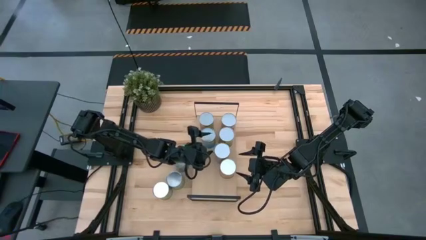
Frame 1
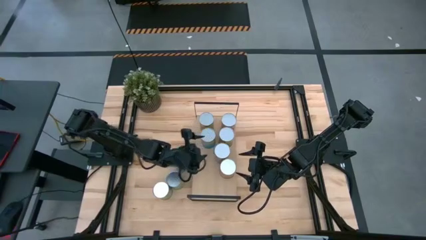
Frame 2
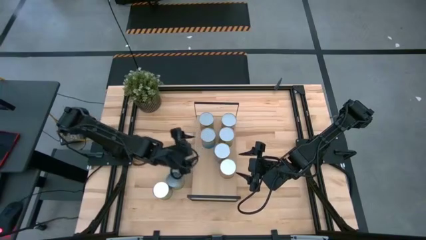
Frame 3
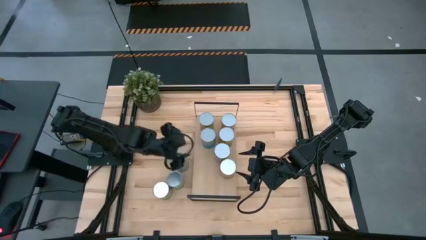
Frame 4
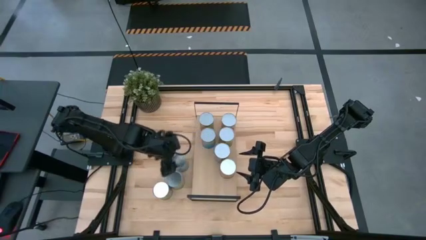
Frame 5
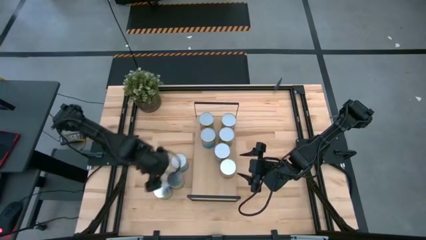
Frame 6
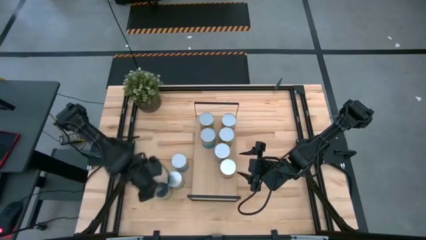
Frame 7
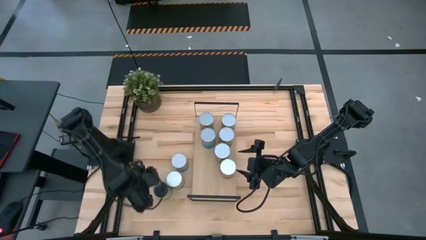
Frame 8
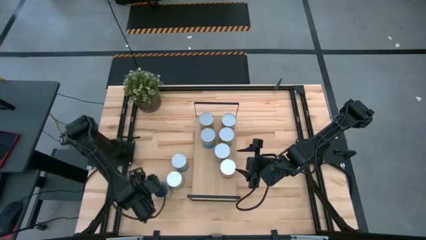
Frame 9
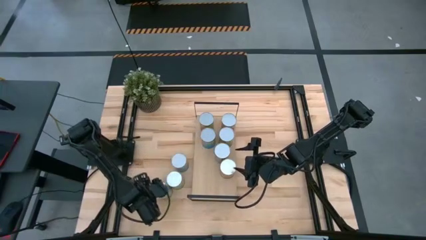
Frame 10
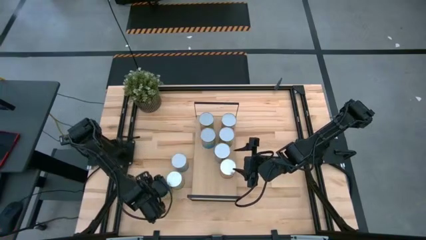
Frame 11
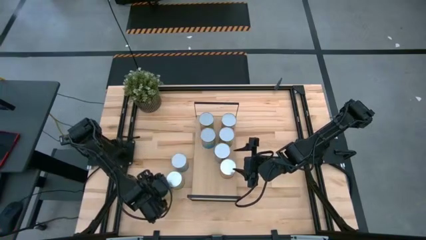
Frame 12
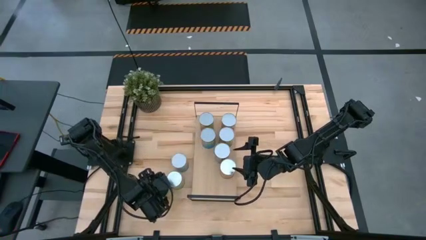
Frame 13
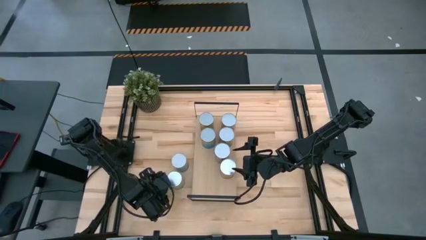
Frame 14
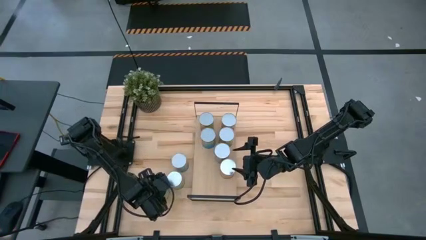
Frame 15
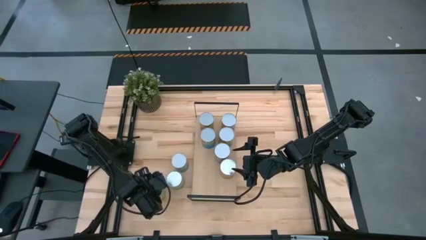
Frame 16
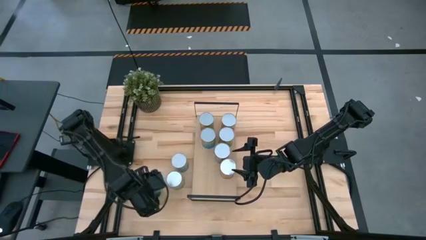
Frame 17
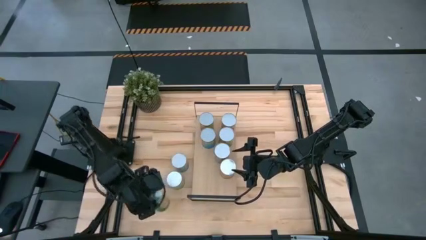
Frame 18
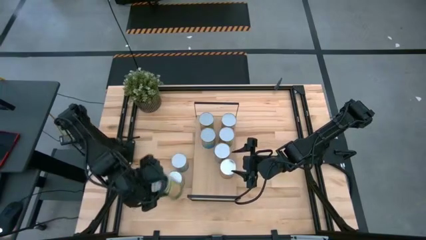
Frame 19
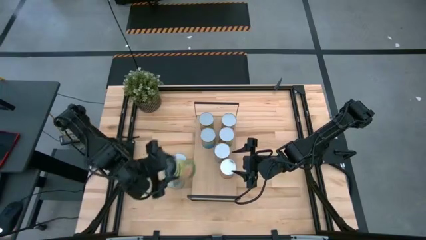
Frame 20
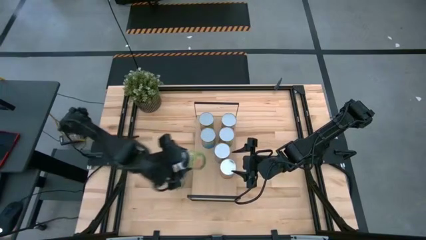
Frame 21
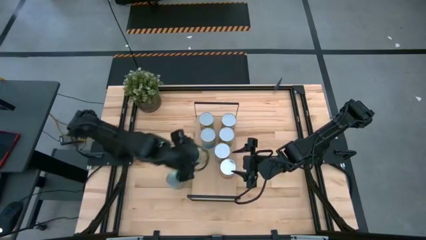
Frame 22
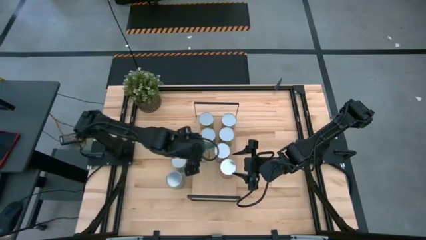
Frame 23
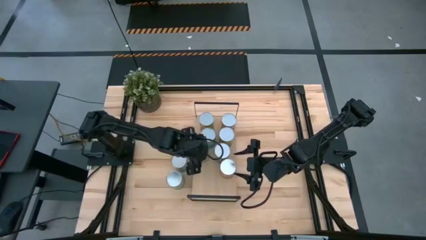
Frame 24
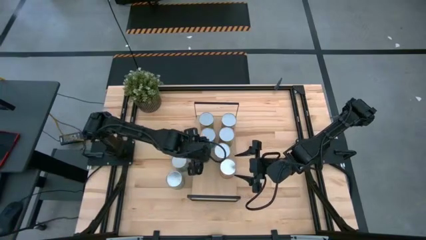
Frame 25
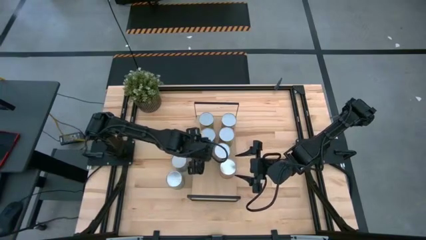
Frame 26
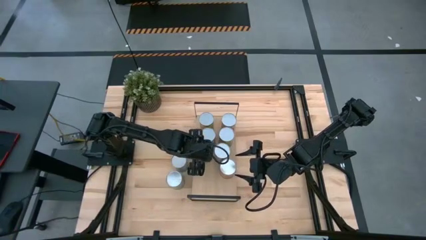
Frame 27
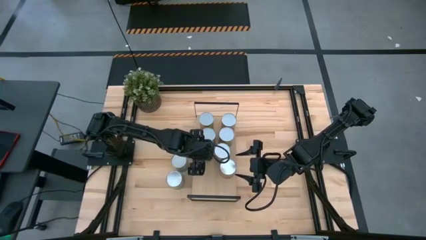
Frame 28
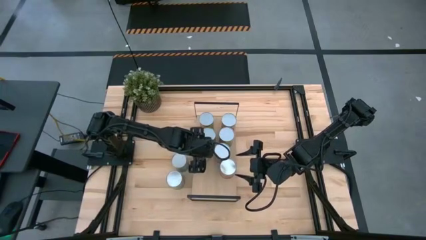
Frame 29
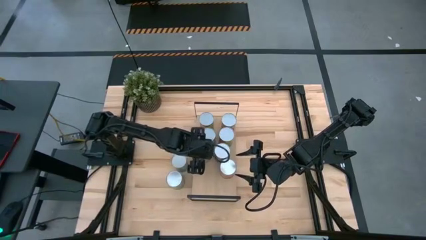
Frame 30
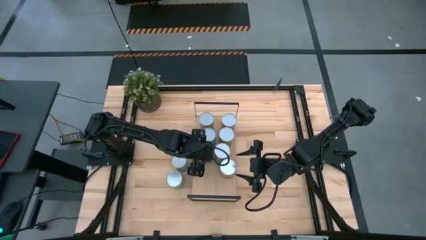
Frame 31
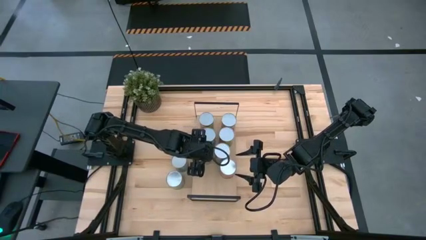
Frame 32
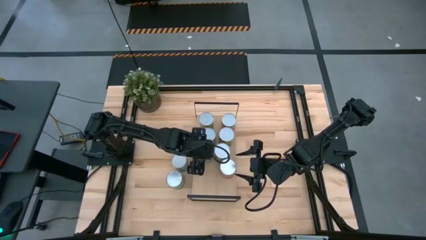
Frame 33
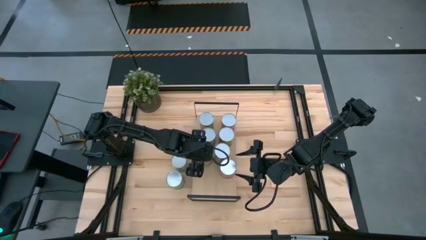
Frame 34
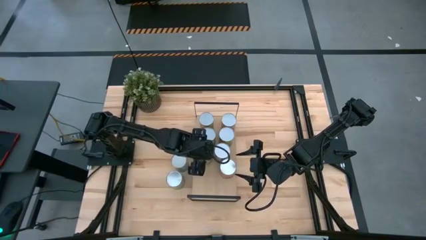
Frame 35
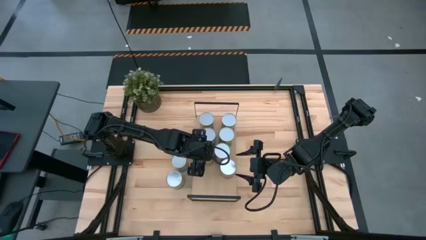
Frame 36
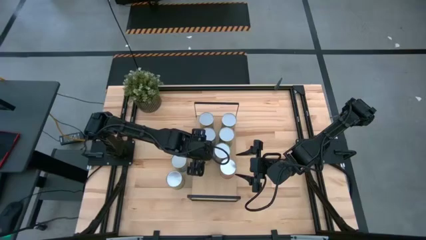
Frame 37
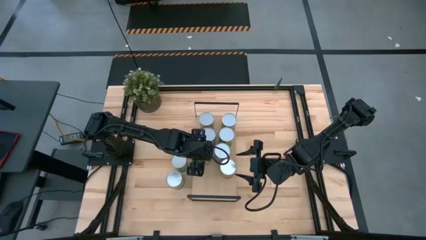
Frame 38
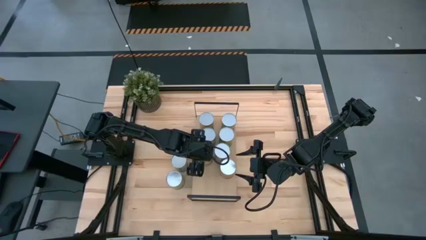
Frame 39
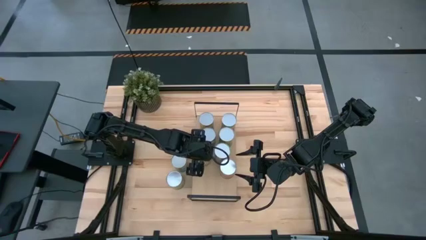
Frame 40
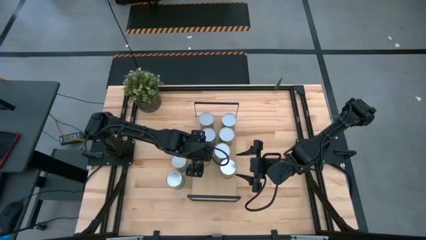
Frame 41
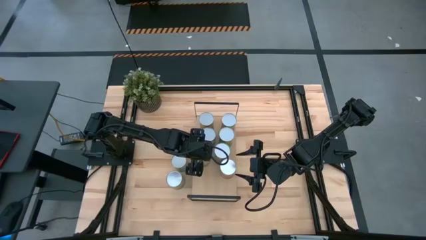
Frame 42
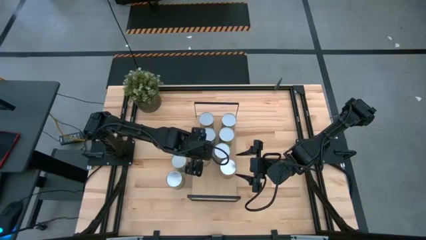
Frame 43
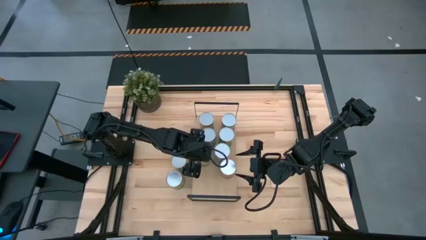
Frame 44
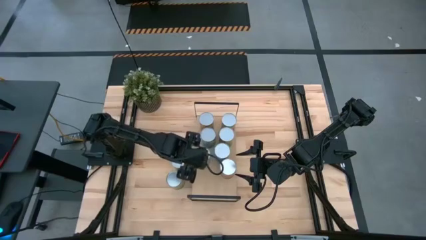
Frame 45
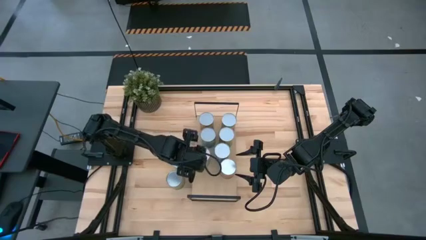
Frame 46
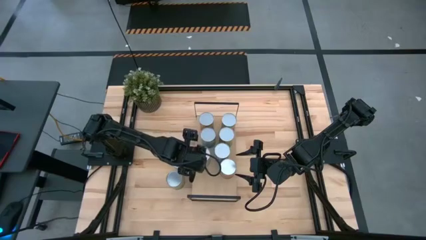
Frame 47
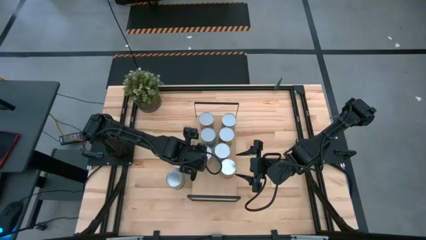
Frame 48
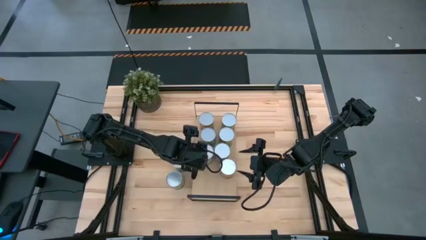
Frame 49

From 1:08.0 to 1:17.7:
Task: Pick and place cans onto a shelf
Put the canned oranges on the shelf

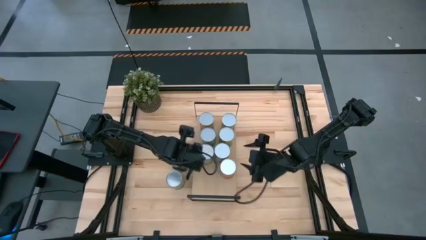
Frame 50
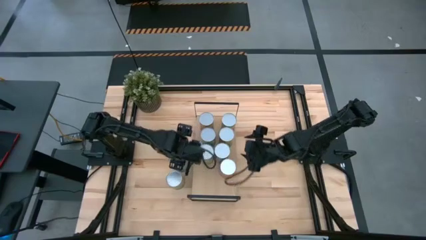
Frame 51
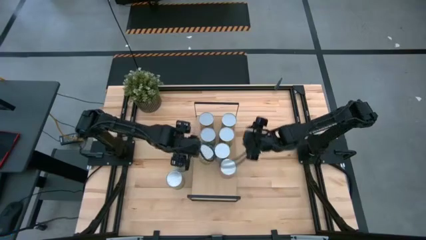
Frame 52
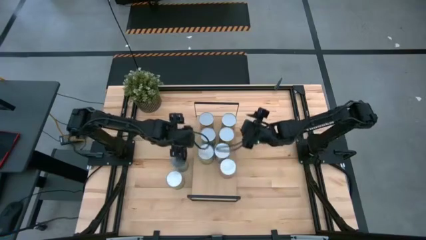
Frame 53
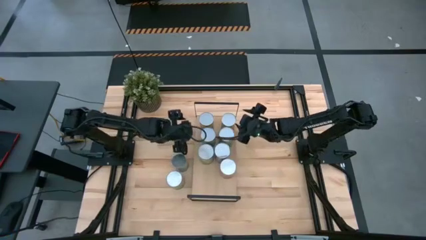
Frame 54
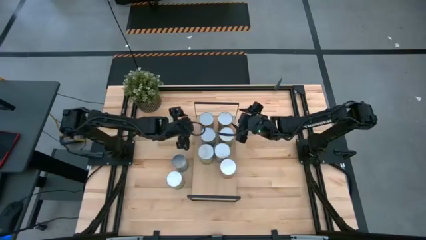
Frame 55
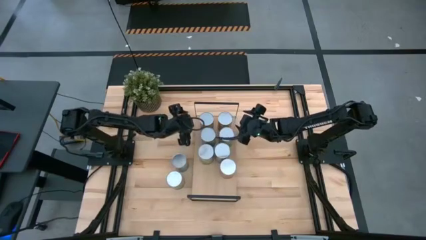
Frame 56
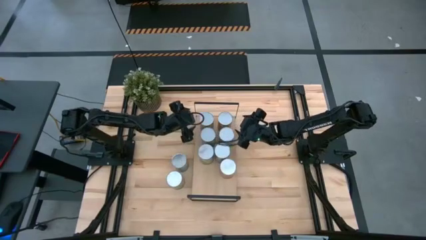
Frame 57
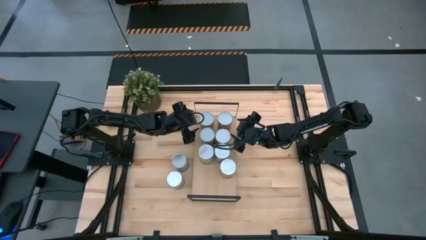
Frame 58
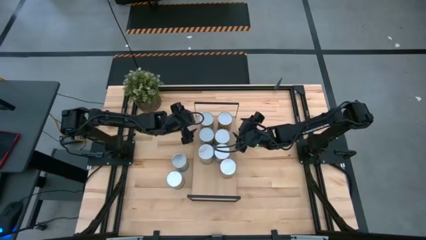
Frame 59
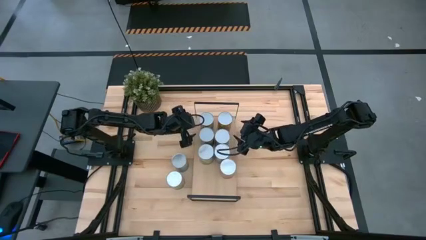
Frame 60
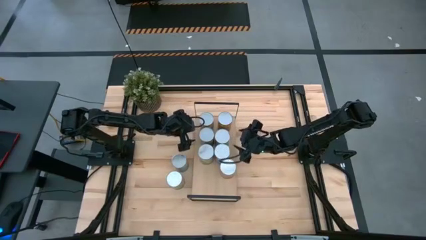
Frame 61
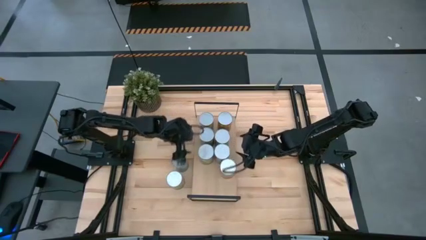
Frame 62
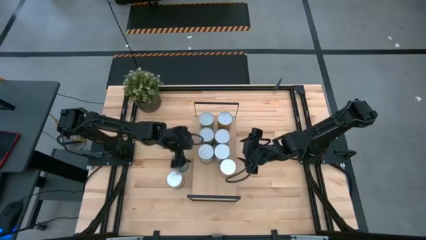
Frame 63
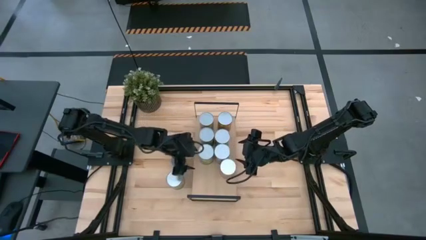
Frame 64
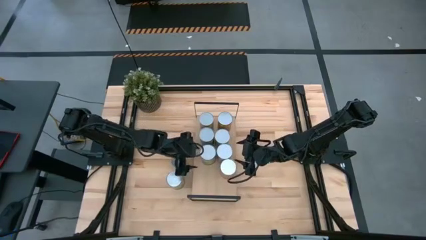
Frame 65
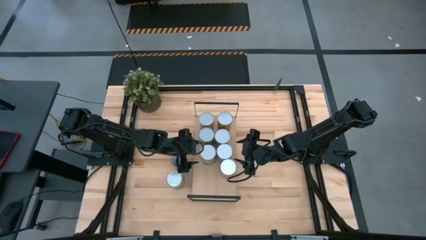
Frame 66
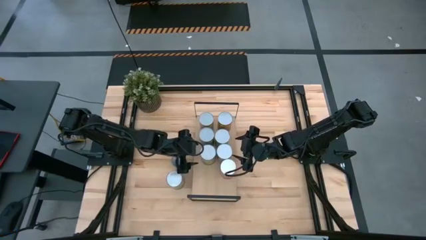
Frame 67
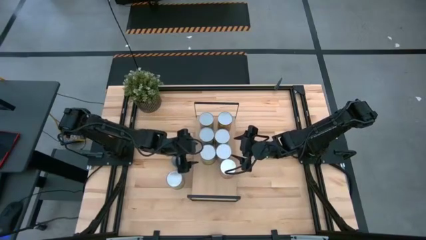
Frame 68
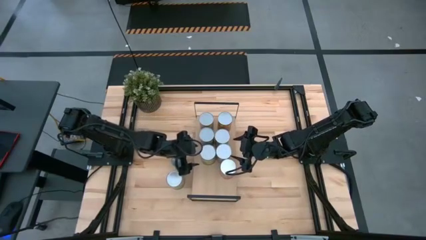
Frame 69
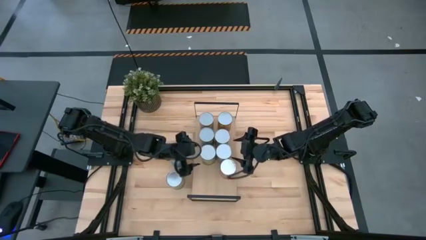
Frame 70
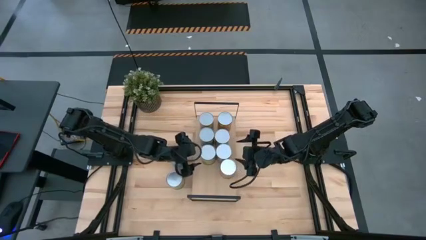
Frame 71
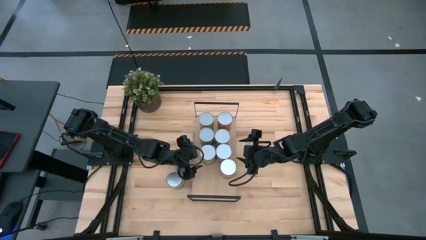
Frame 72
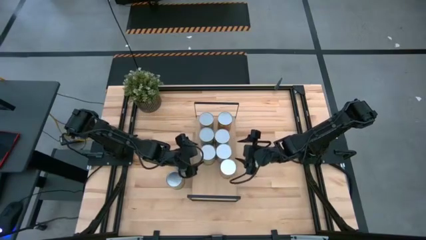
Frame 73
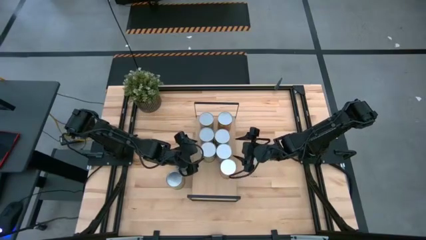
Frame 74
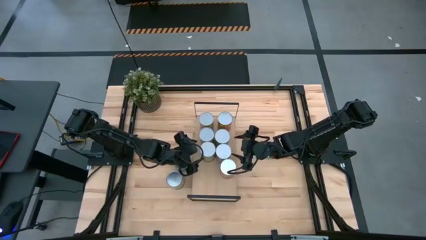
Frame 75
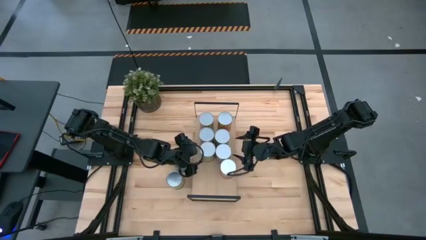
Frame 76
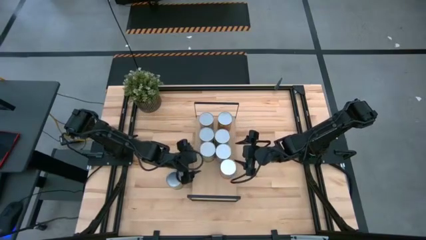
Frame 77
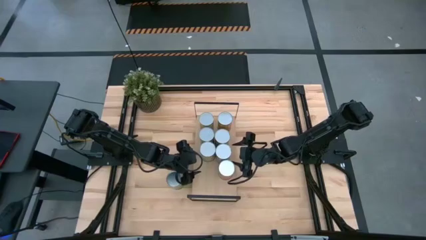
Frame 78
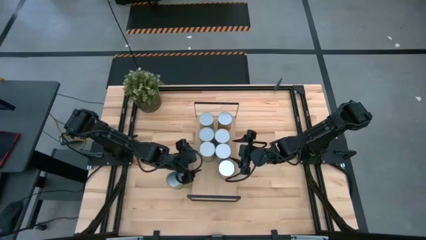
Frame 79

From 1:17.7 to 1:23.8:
Adjust the canned goods
